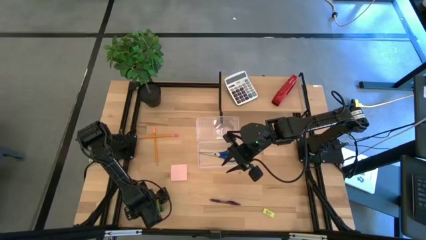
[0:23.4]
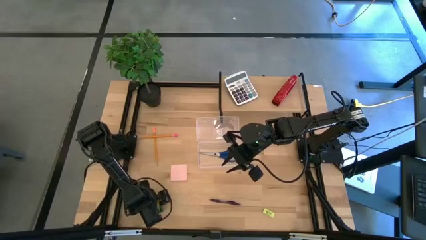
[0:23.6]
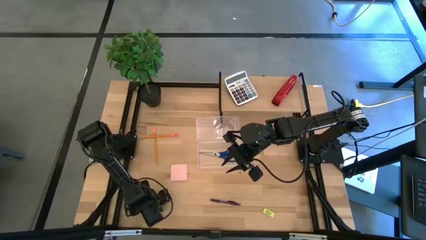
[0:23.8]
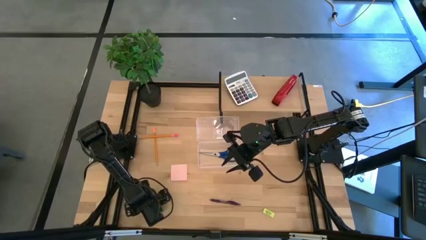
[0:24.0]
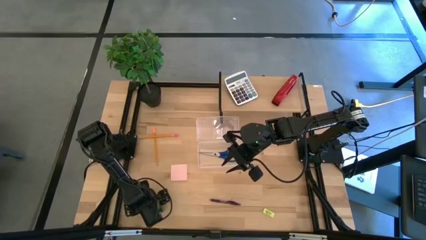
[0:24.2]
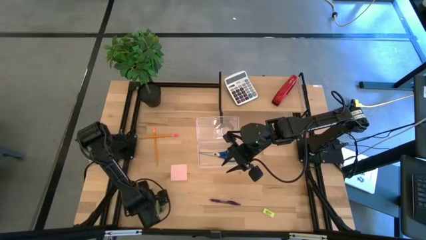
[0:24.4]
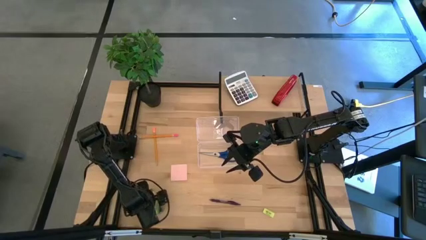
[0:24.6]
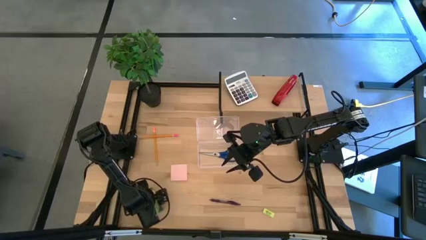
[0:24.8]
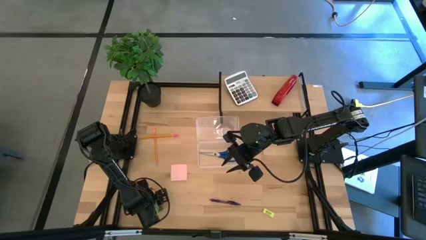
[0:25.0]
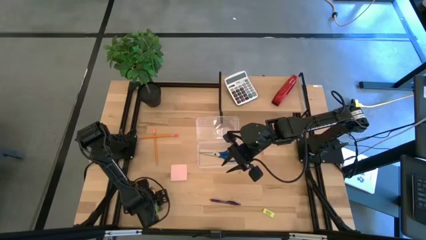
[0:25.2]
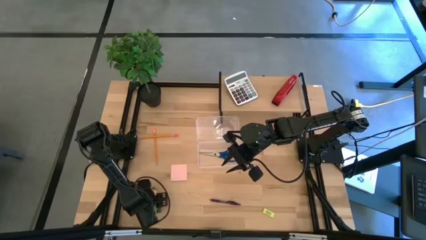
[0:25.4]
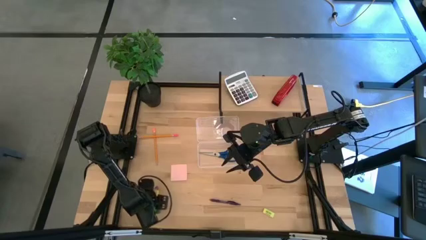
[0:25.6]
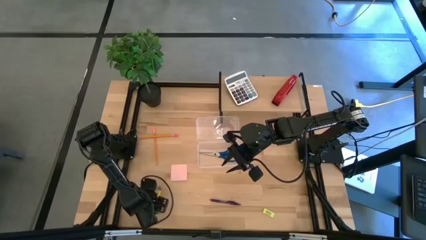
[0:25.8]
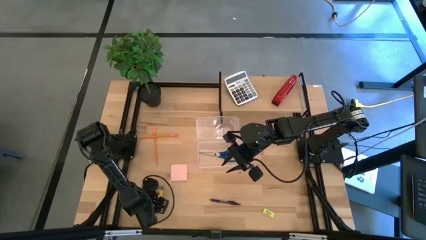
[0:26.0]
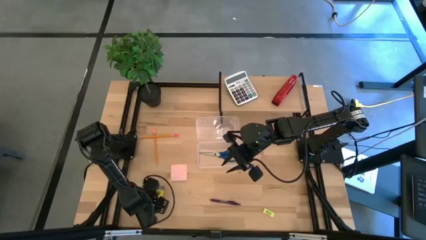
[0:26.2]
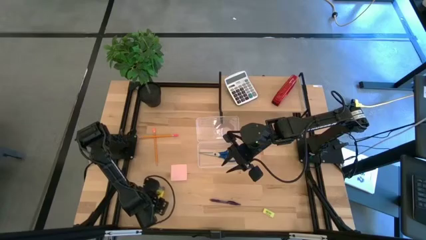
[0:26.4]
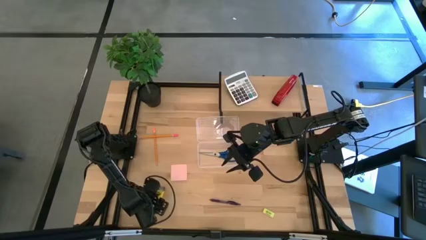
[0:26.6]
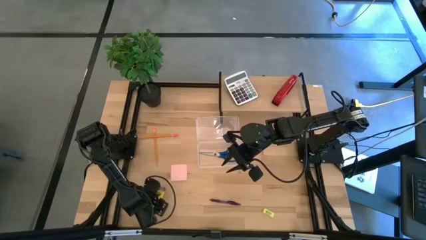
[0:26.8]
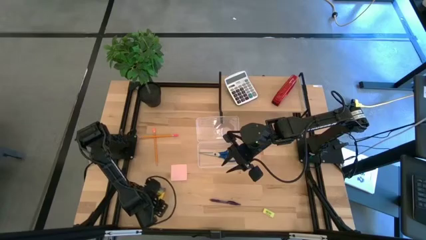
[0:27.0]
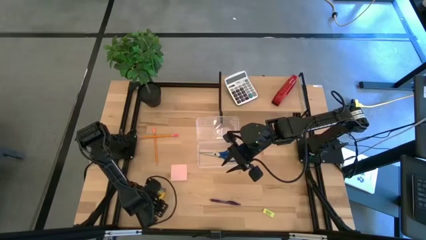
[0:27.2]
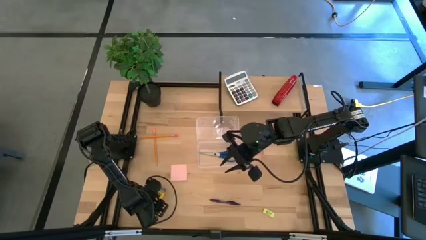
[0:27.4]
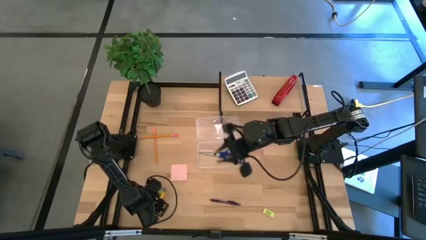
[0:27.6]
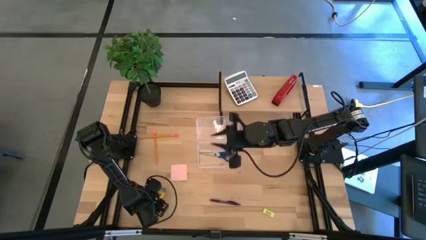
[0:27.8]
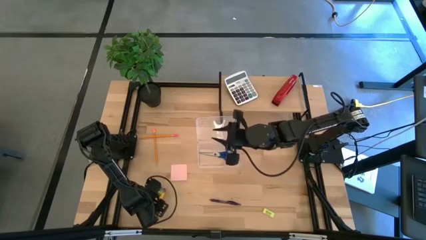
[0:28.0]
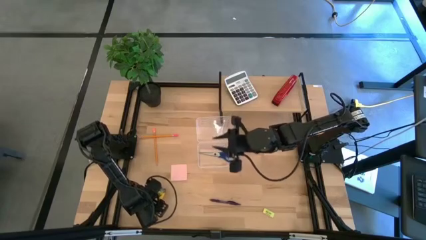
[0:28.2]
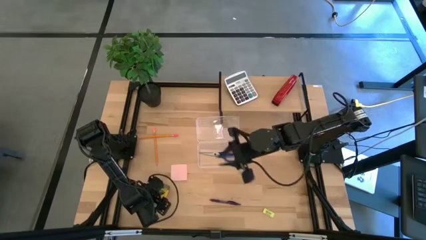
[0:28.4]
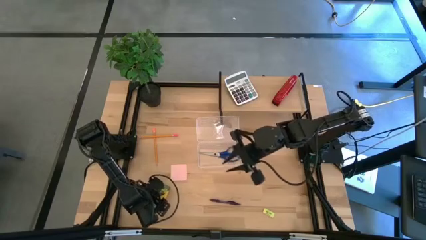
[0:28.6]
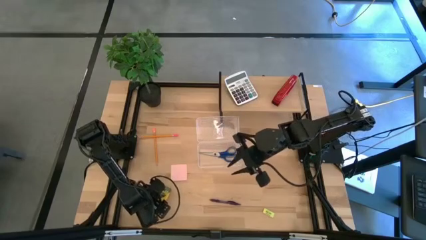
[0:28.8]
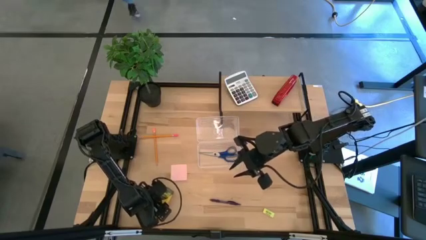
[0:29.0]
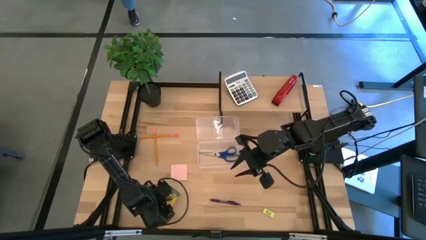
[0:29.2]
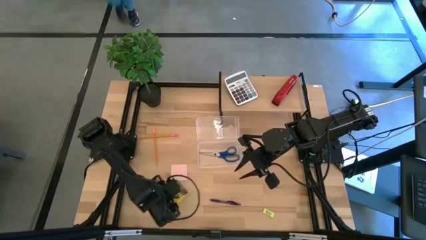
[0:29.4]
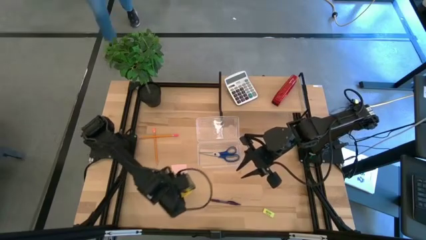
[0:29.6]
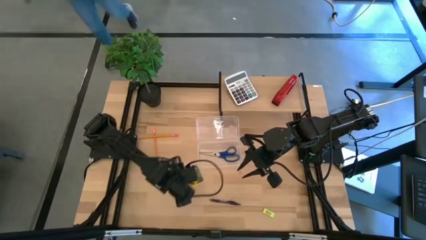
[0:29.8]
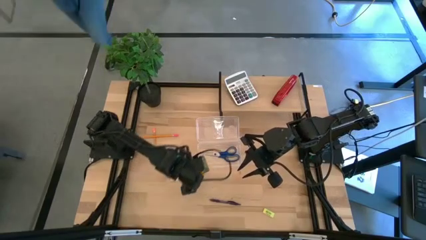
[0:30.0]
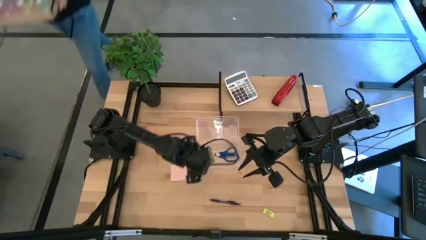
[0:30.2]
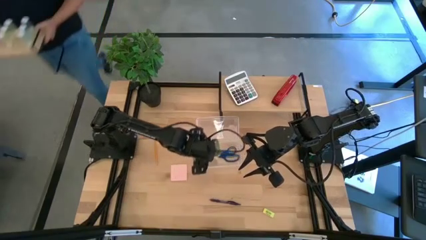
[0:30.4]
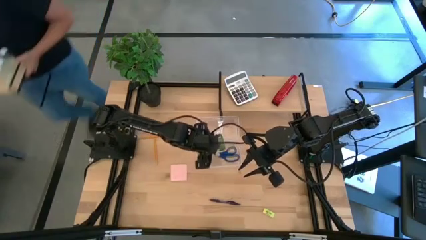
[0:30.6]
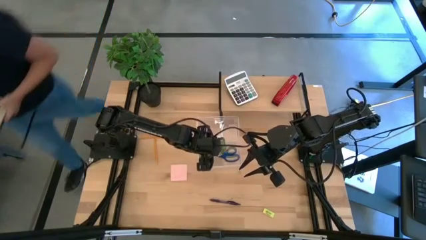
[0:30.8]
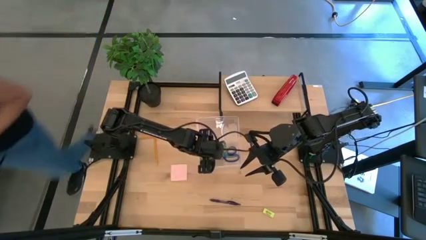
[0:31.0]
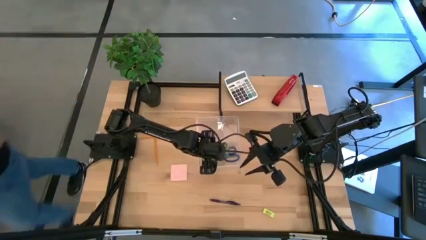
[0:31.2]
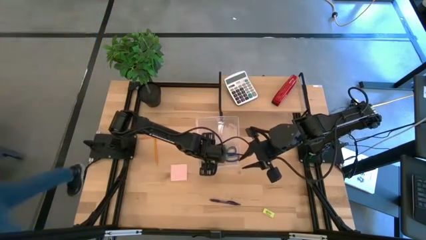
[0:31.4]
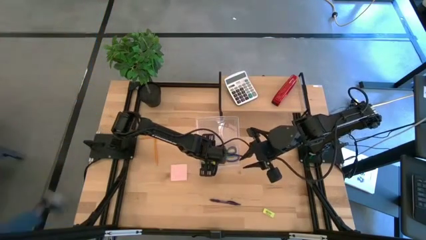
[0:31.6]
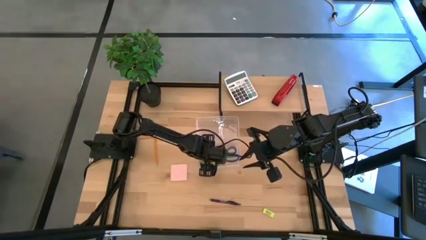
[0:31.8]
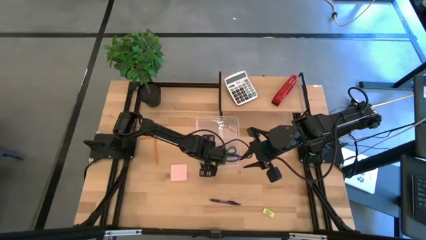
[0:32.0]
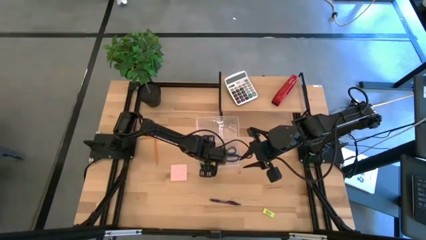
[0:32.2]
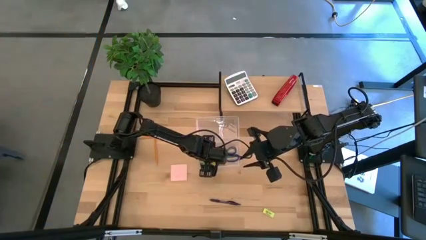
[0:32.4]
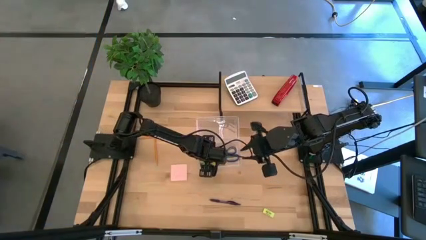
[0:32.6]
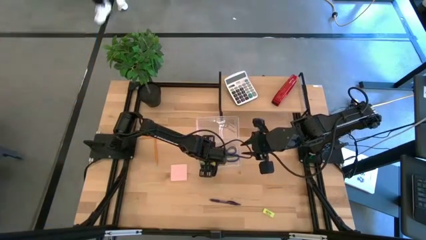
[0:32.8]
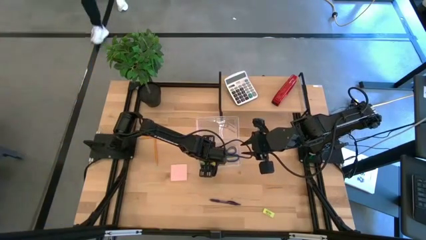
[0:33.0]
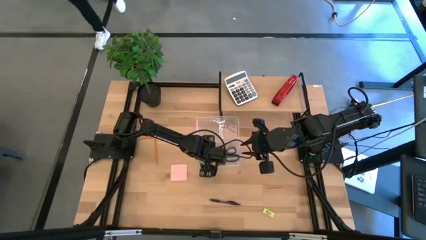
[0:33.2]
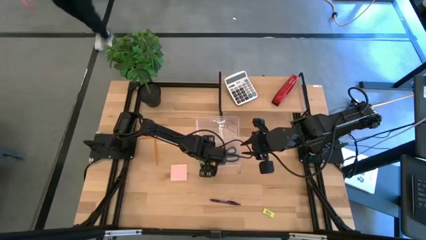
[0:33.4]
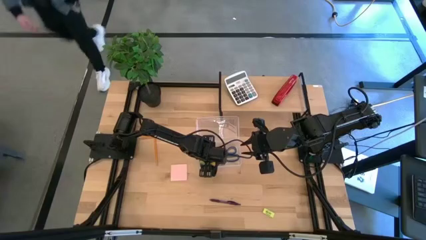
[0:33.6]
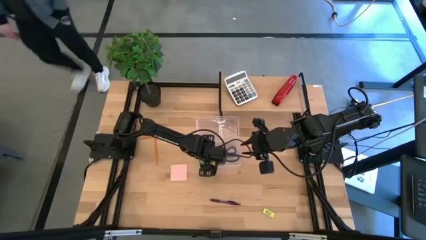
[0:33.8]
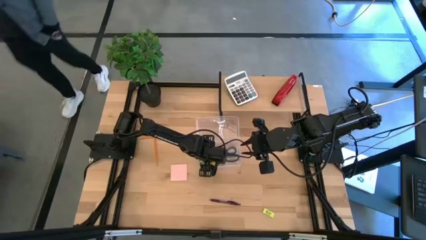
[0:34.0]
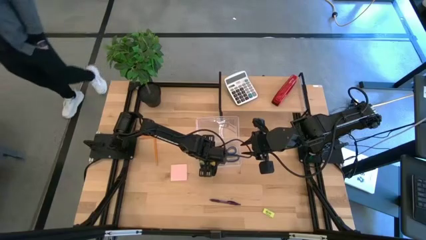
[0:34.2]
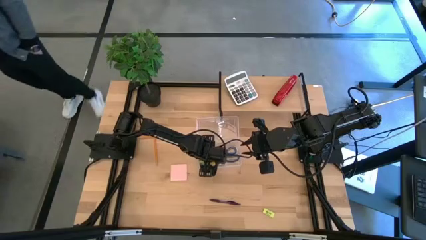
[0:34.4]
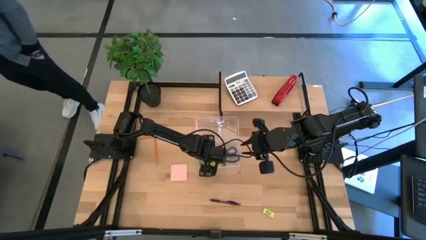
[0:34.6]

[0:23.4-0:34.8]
Task: Pack school essentials
Put the yellow crayon box into the transparent supply box

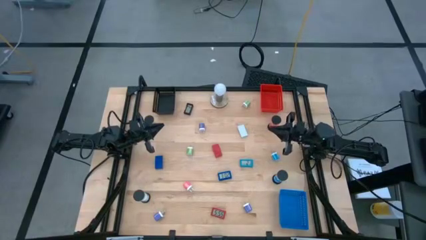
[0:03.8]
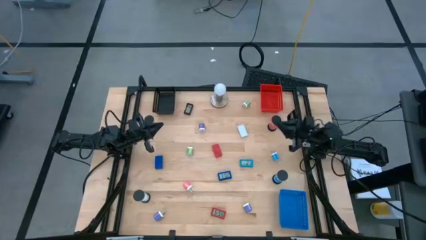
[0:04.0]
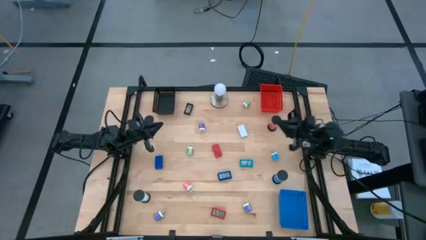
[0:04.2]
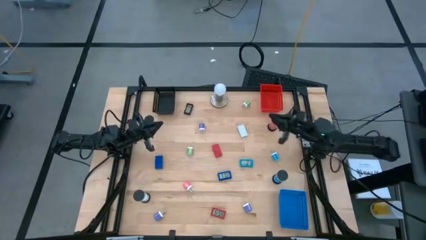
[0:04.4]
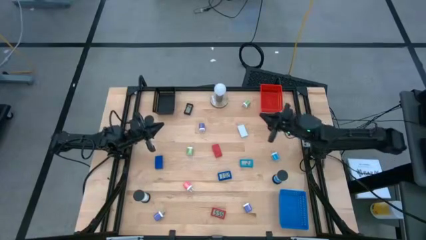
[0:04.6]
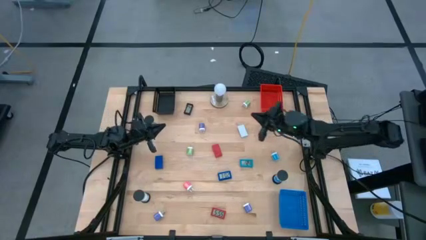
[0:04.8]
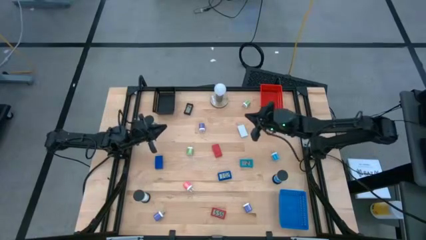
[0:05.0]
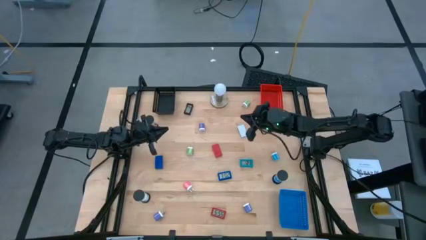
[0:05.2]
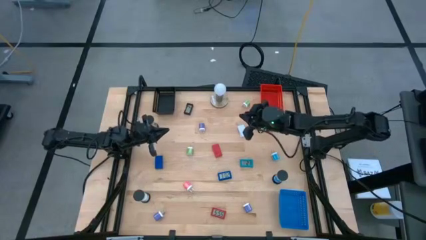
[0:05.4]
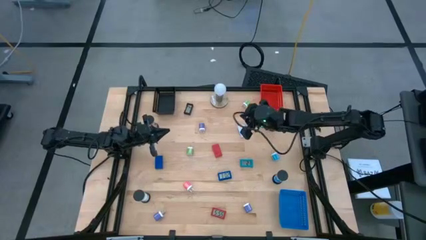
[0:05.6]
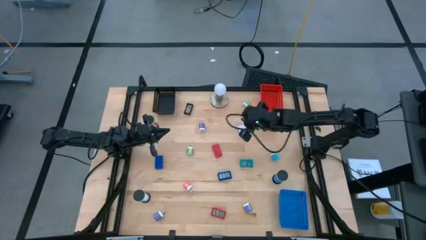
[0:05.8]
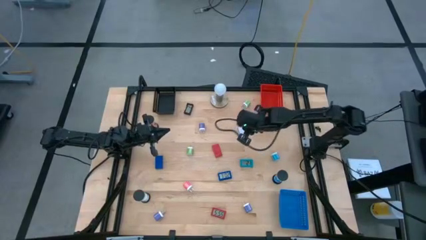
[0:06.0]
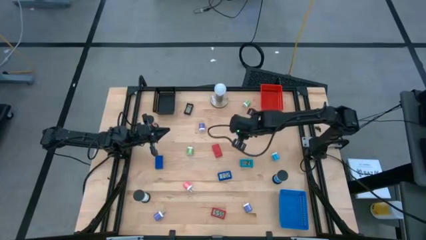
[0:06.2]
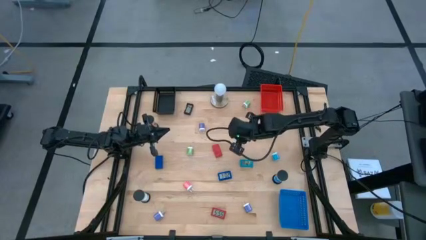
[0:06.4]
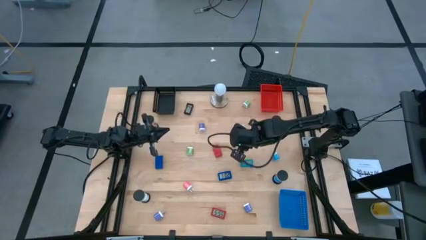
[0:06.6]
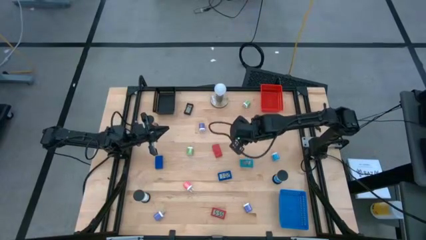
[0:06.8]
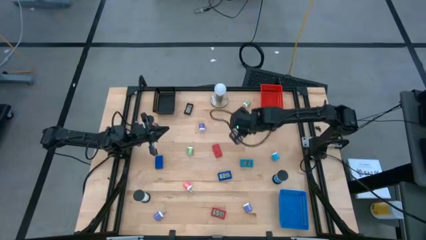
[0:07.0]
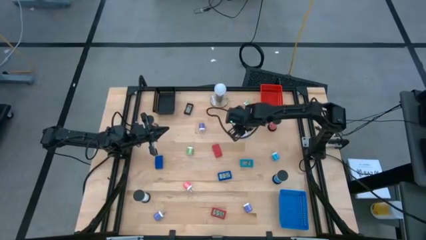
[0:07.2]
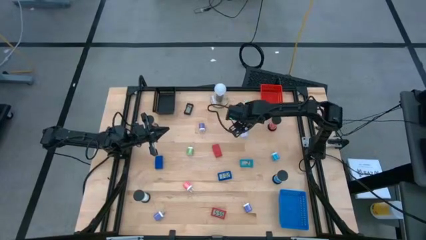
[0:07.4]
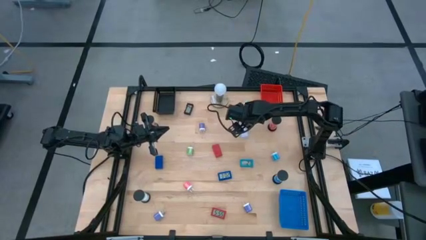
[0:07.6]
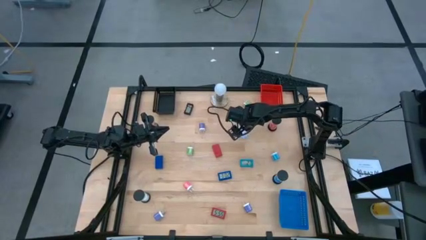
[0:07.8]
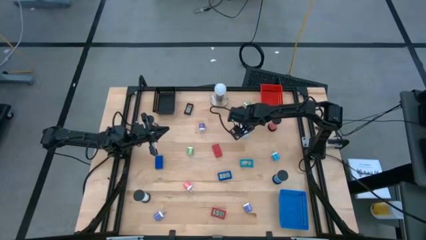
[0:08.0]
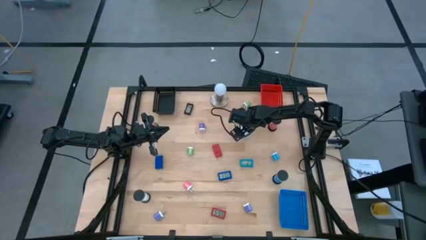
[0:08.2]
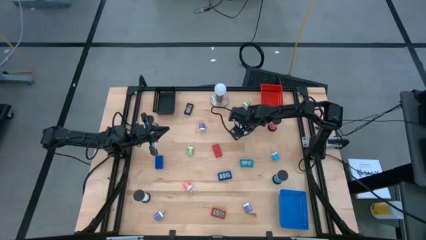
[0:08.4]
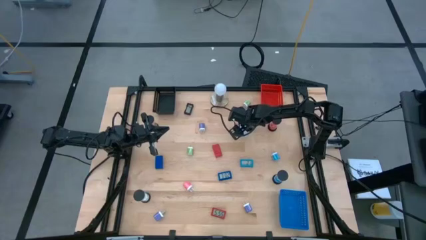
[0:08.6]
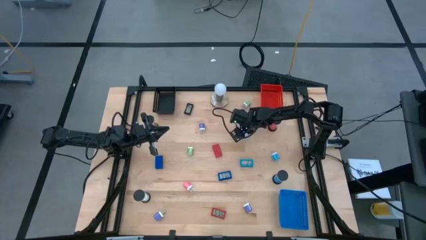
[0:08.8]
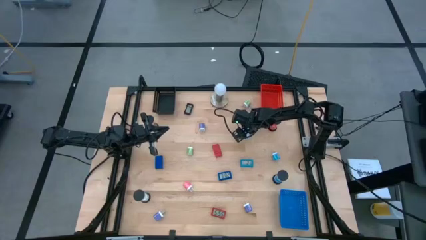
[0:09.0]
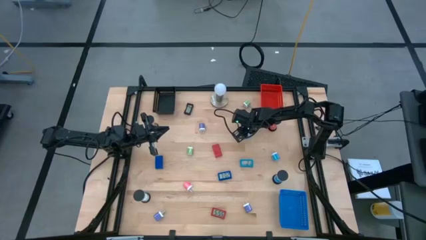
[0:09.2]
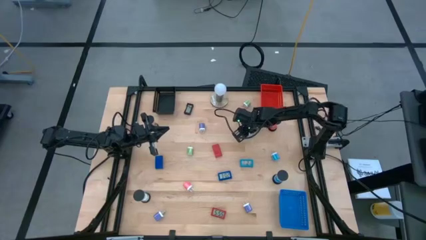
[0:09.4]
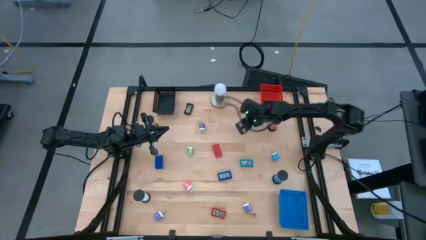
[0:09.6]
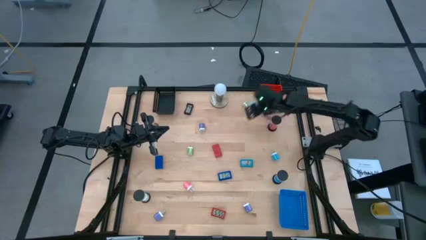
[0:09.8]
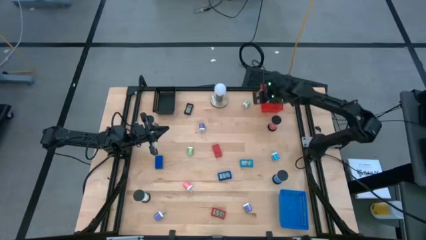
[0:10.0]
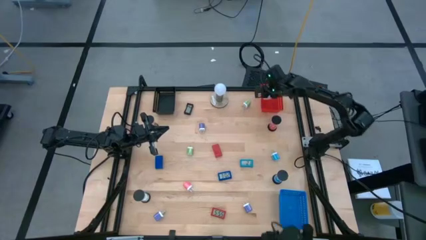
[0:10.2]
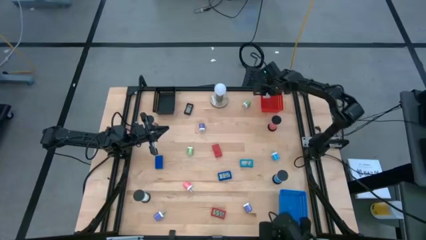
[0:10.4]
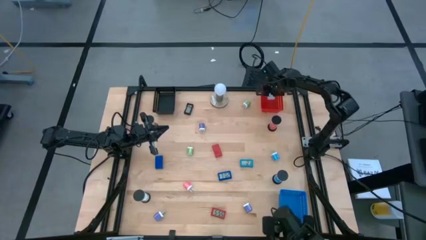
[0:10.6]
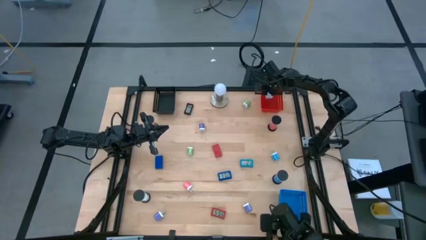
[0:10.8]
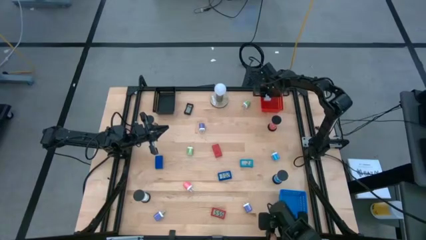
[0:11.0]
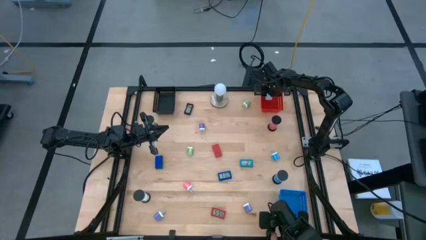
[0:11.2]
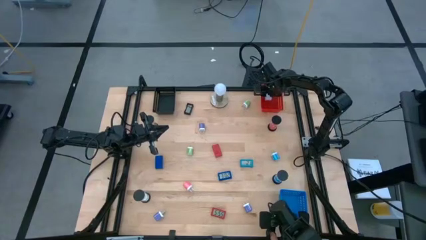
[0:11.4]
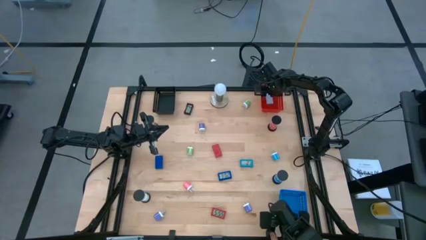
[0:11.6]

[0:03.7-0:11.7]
Task: Pick & Place Office items
Put the white digital clock into the red bin
